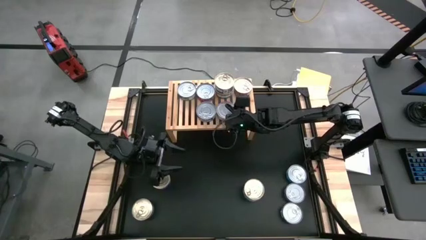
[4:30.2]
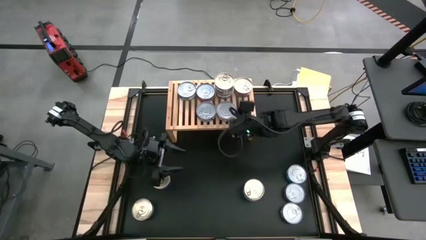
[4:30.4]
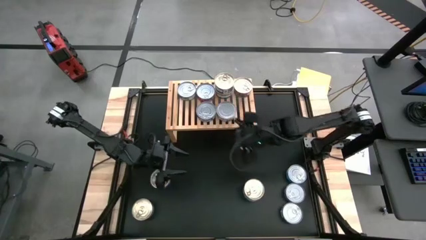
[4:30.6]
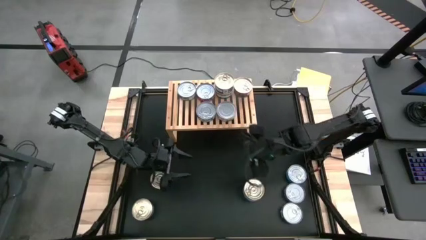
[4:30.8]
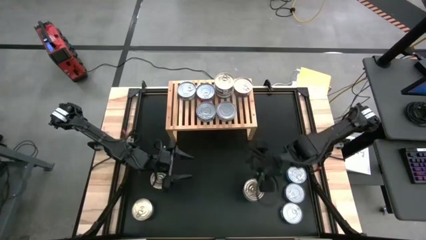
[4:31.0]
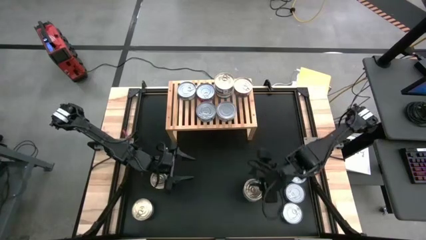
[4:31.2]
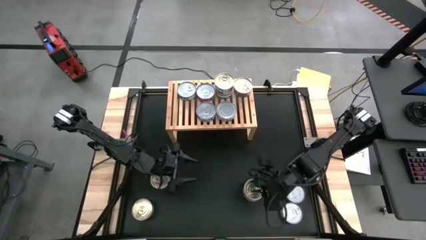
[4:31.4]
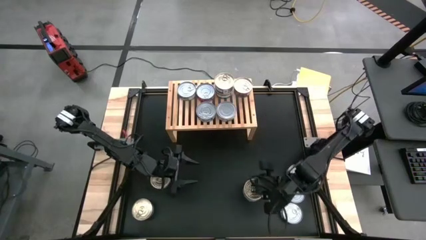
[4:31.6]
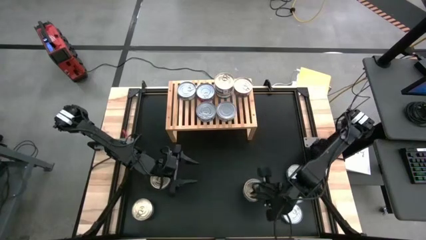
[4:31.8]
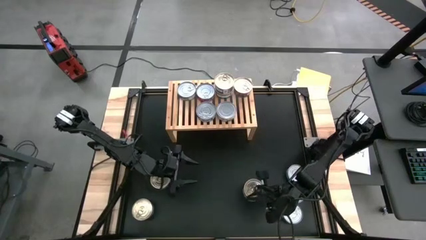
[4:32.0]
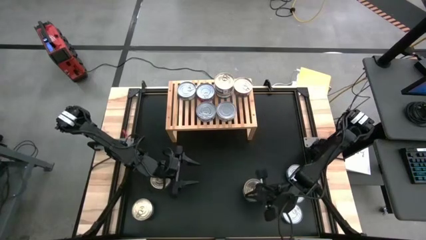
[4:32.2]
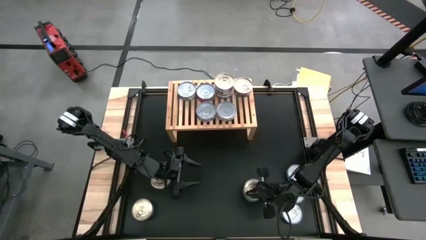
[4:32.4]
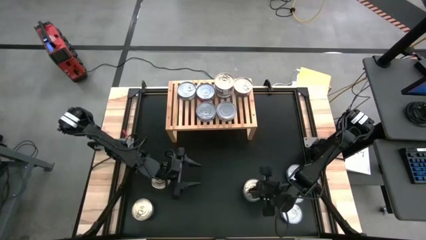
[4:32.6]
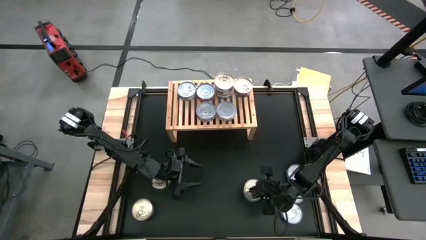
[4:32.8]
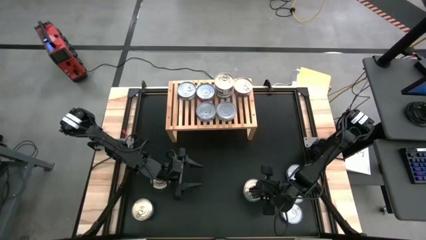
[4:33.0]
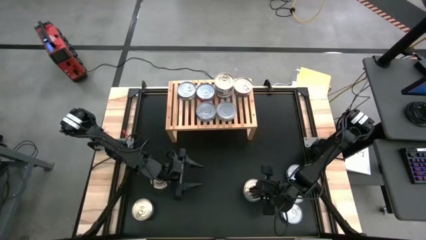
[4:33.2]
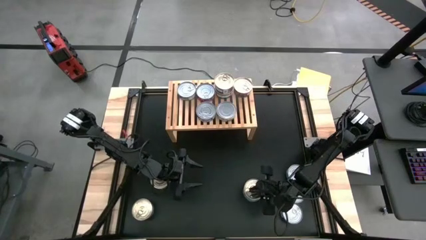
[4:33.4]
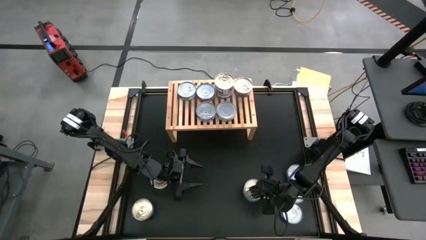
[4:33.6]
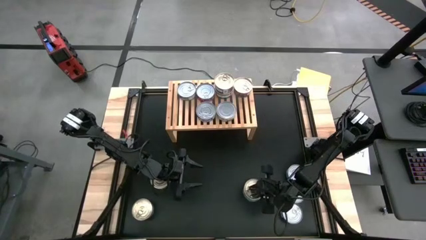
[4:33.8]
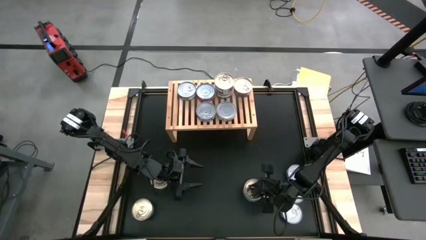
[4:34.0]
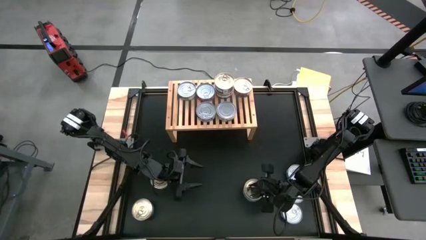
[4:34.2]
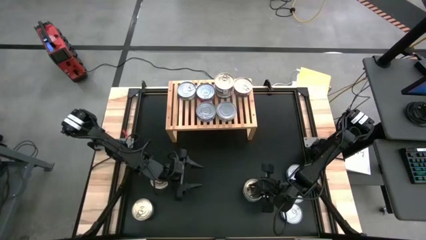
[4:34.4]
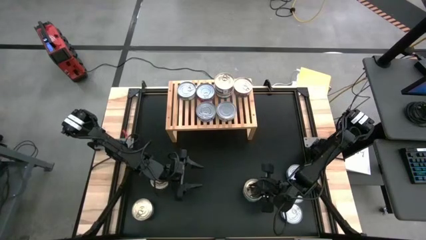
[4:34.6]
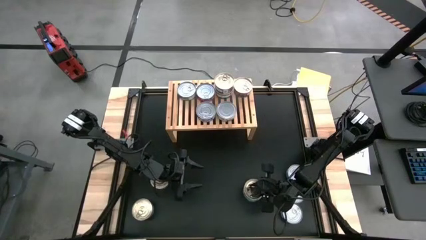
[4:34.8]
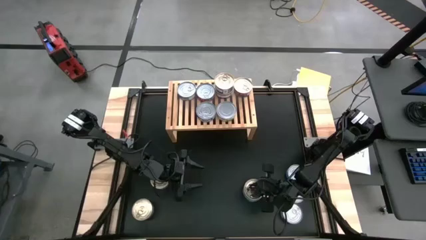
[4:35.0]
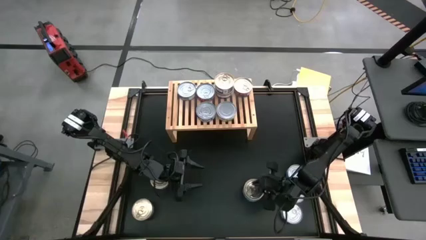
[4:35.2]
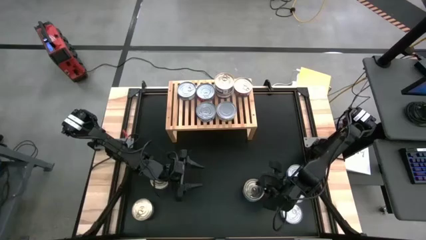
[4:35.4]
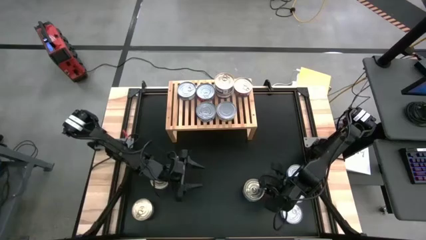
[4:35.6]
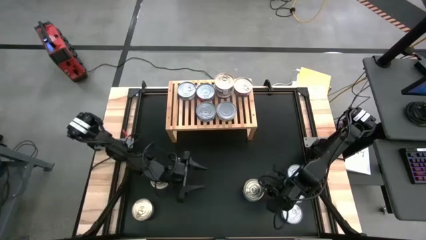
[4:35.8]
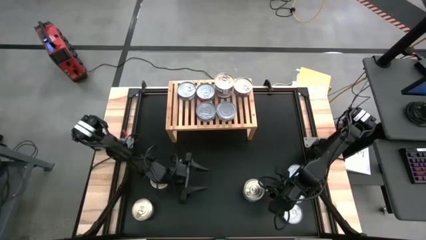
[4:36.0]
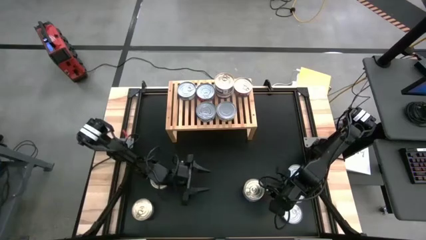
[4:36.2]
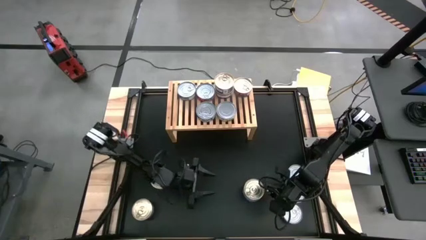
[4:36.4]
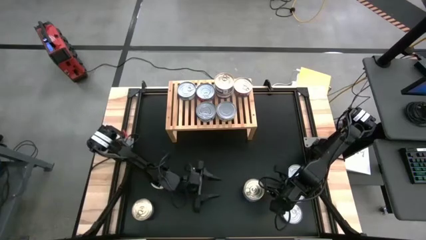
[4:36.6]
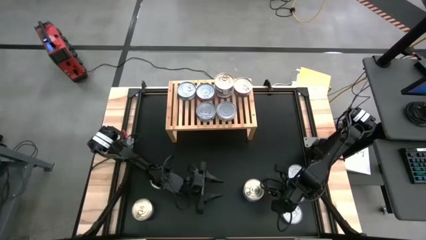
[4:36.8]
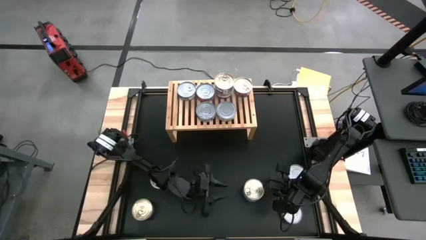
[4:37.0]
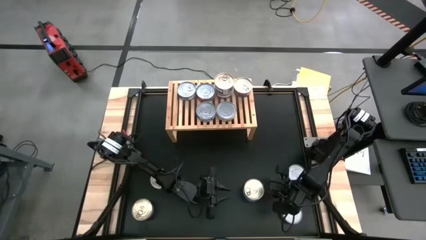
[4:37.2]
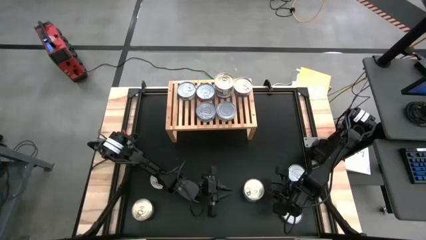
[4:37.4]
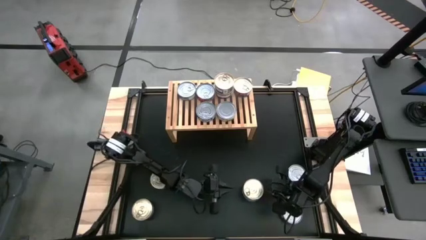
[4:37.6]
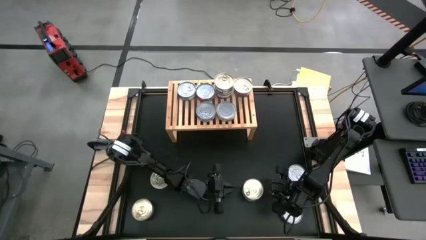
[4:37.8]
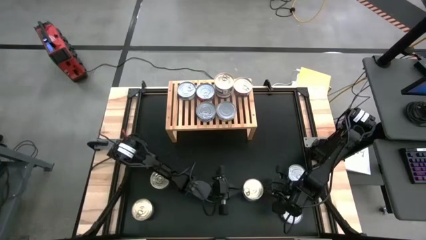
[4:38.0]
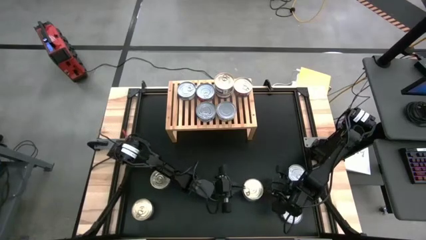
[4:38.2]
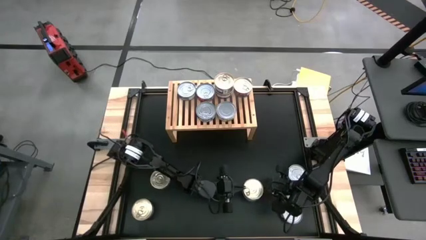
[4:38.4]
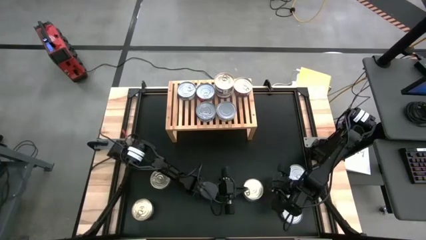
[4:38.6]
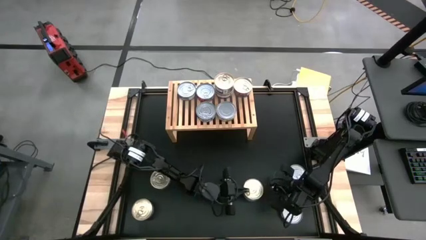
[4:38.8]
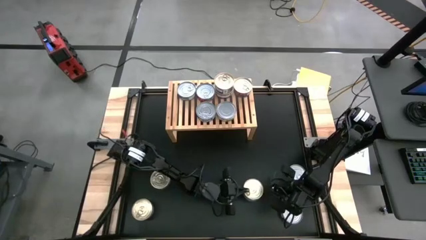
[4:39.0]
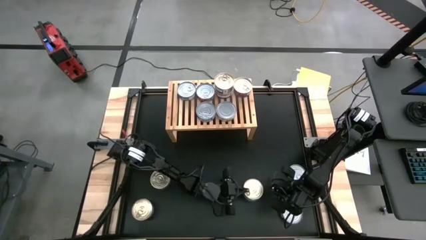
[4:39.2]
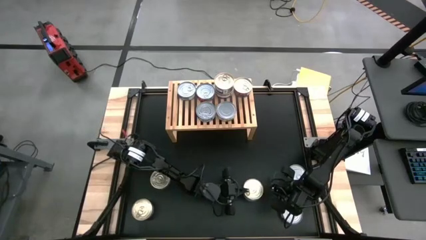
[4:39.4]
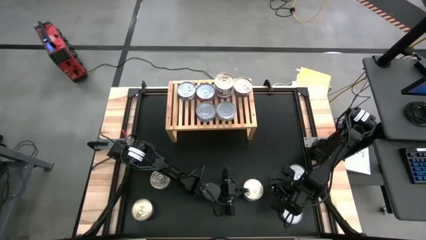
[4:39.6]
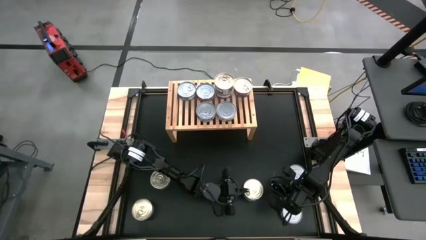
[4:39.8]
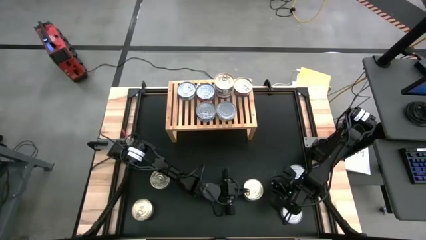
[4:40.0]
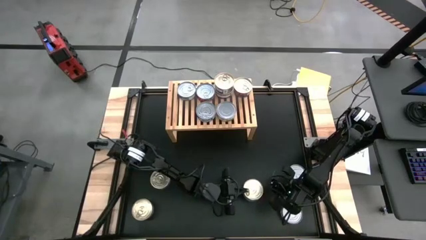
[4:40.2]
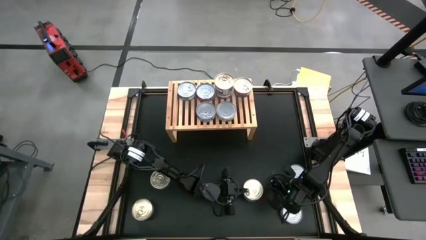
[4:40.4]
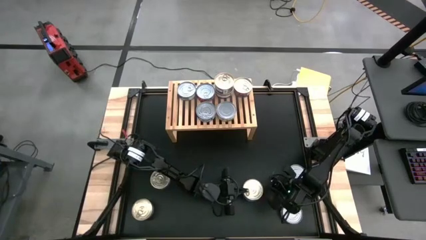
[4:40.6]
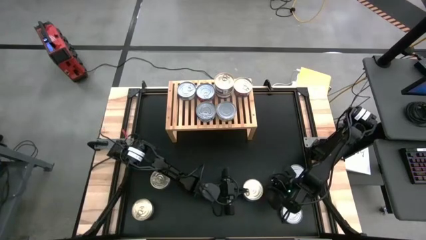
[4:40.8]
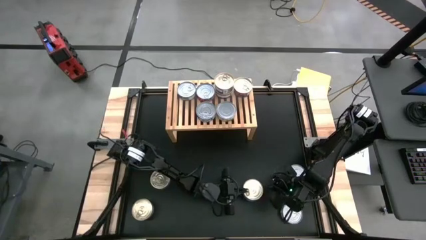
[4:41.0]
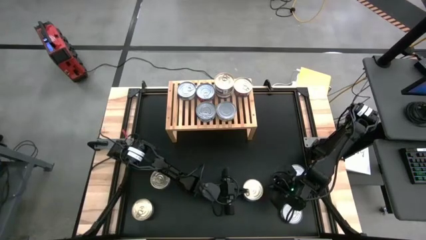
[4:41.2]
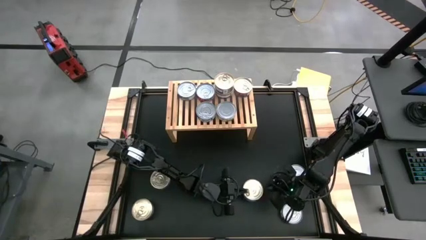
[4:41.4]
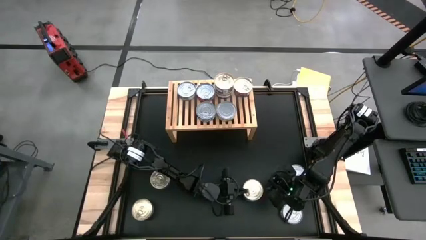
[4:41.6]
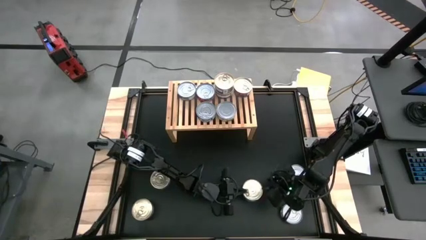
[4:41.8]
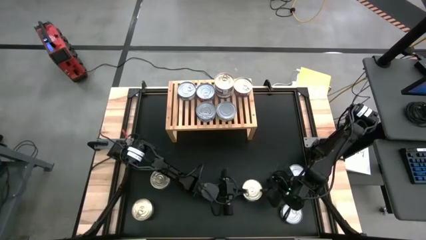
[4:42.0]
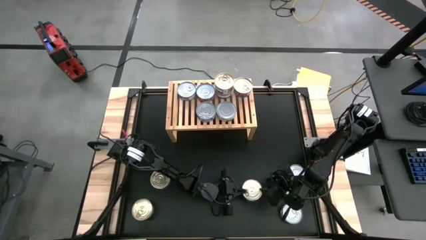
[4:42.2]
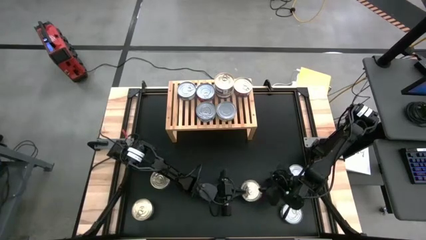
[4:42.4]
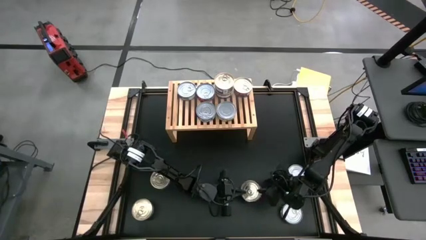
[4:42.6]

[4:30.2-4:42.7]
Task: Stack canned seafood by type on shelf
Stack the blue and pink tuna can on top of the blue and pink tuna can

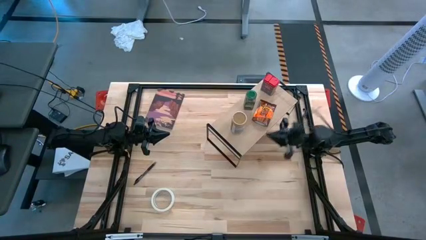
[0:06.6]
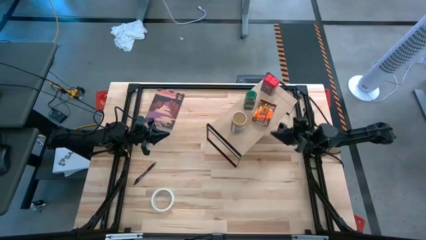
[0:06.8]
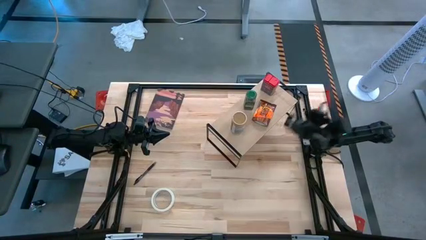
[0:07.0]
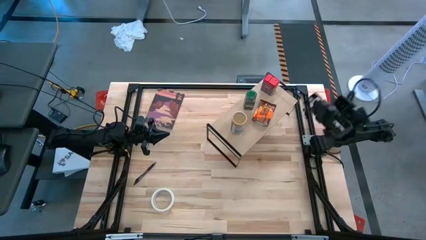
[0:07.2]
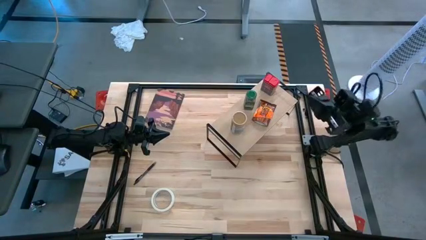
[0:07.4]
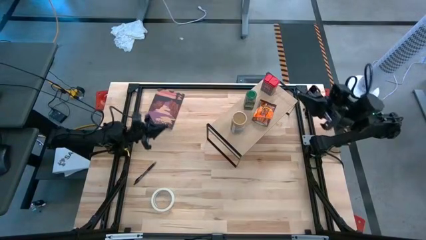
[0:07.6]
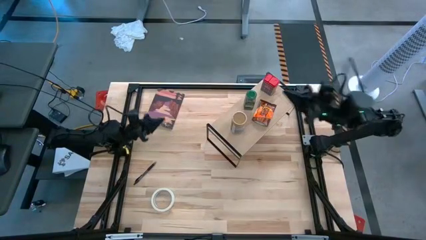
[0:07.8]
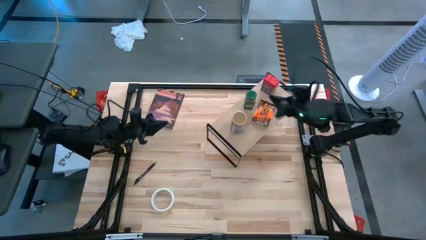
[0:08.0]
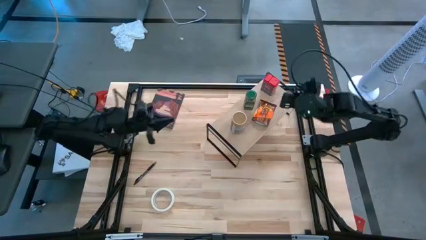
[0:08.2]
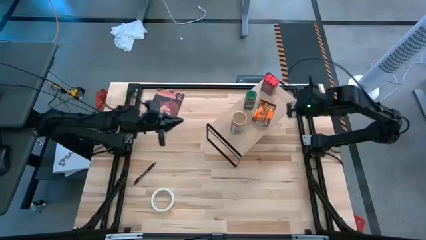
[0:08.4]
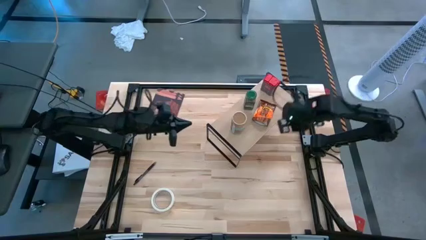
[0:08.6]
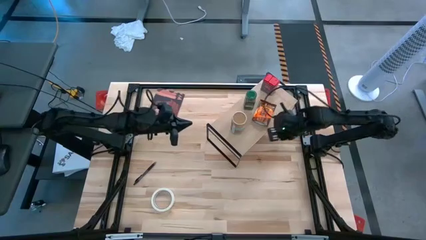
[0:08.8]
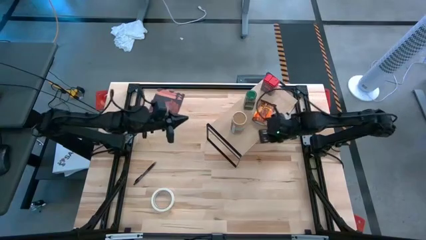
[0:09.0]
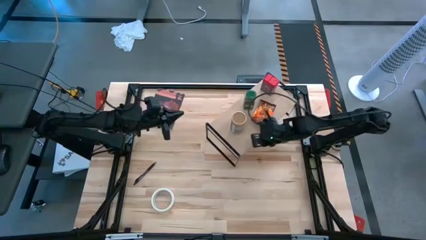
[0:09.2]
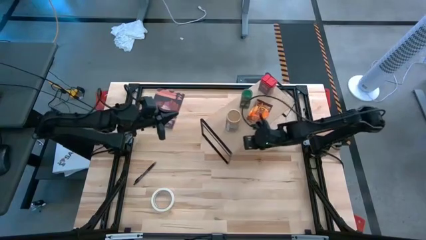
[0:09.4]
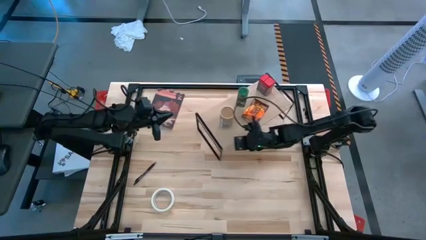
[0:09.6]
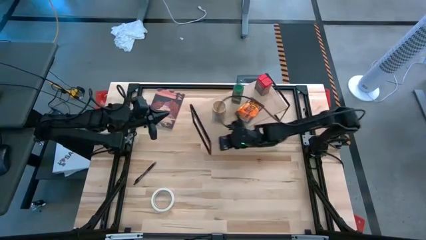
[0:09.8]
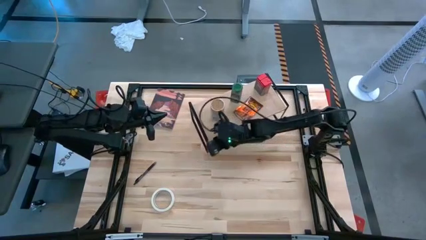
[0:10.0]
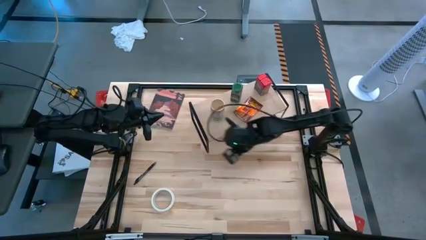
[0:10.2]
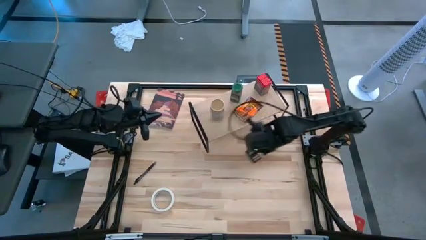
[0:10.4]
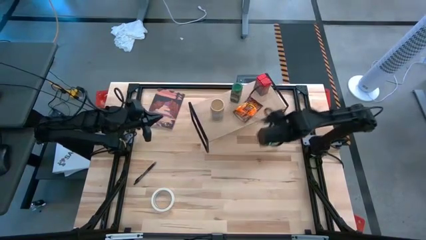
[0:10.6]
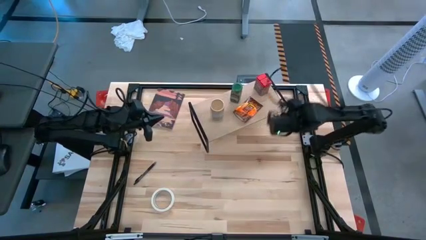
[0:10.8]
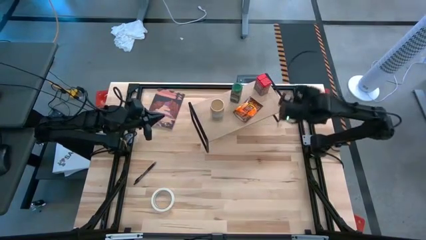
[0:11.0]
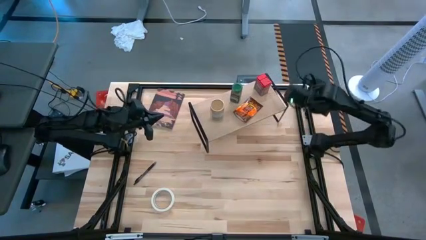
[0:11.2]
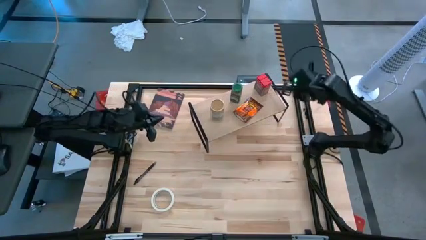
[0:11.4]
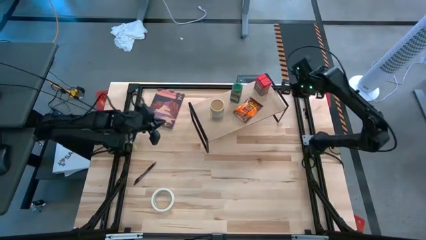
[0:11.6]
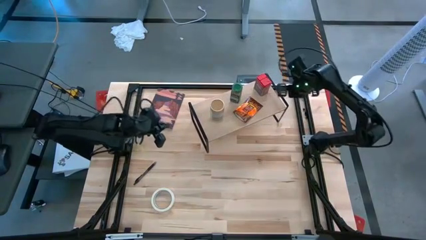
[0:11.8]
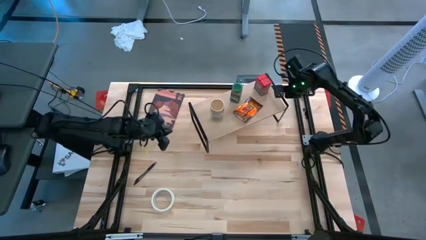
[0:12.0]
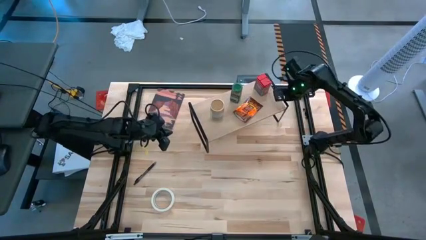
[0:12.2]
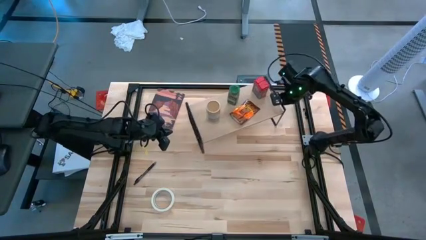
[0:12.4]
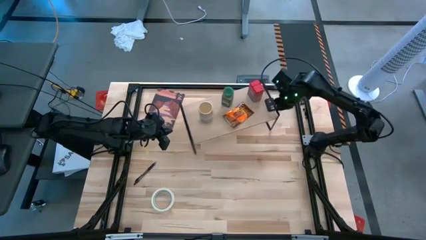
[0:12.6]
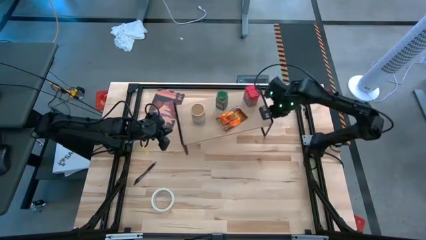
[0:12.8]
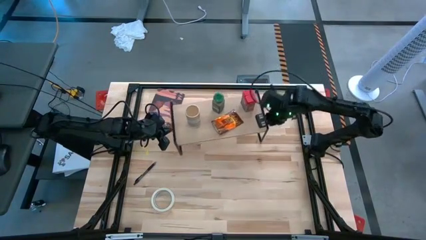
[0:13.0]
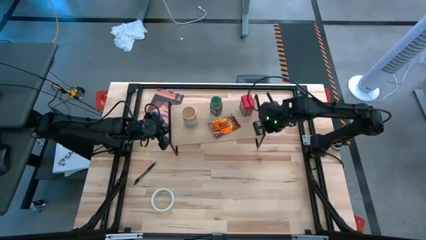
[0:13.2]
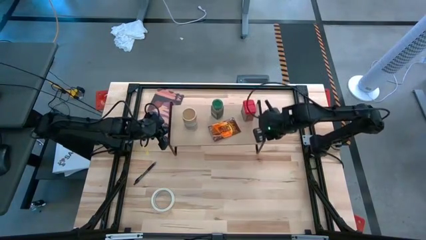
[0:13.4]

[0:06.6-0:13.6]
Task: Shelf spices
Adjust the shelf to the center of the table
